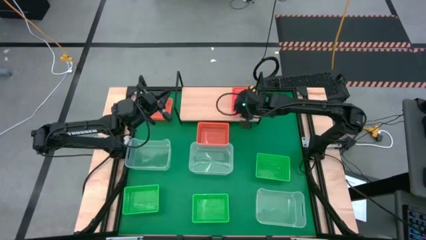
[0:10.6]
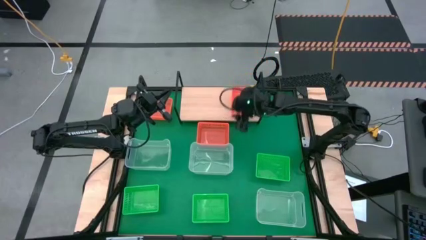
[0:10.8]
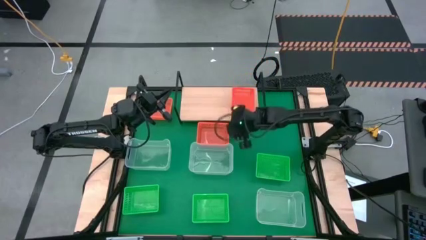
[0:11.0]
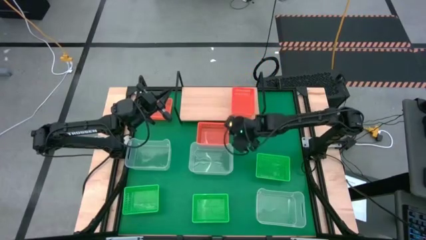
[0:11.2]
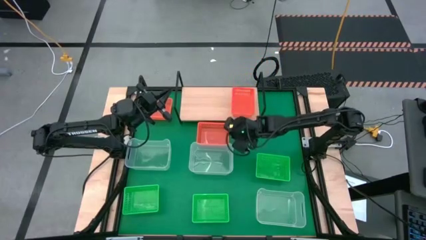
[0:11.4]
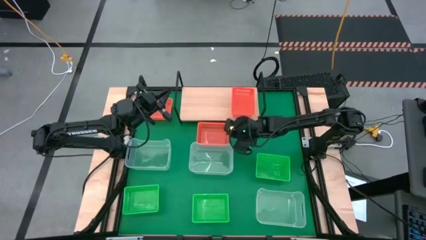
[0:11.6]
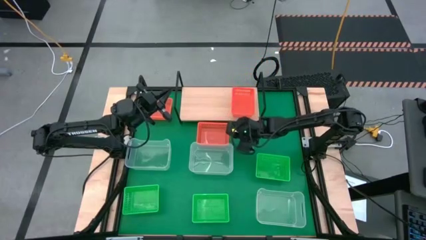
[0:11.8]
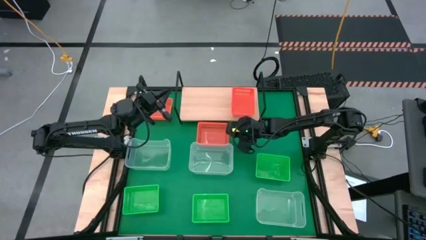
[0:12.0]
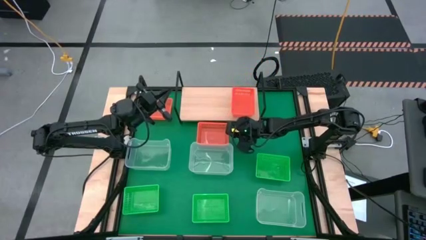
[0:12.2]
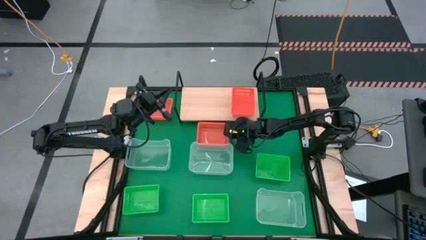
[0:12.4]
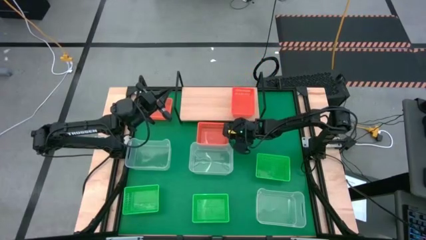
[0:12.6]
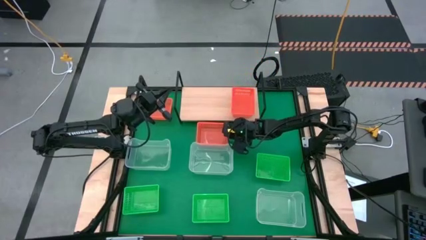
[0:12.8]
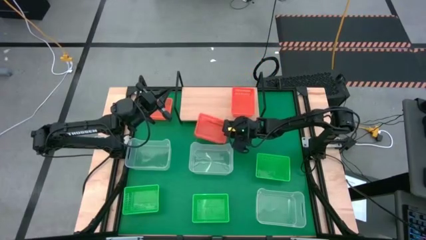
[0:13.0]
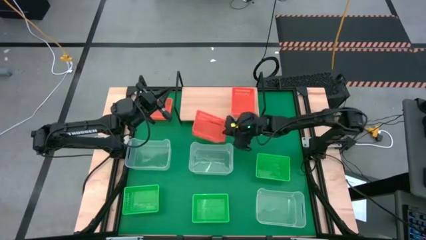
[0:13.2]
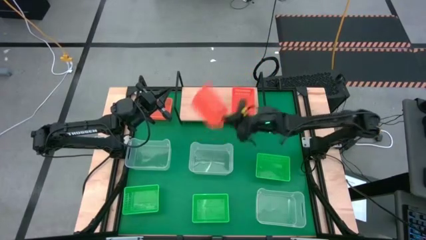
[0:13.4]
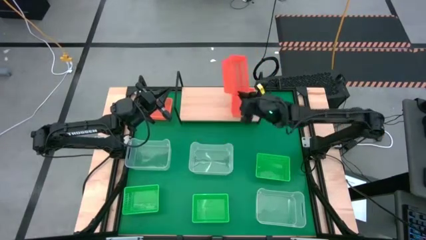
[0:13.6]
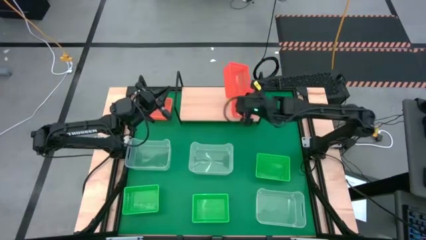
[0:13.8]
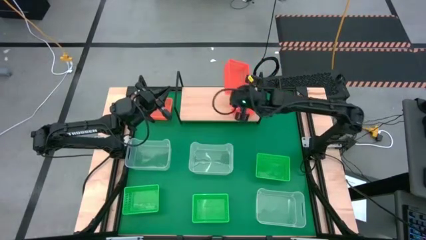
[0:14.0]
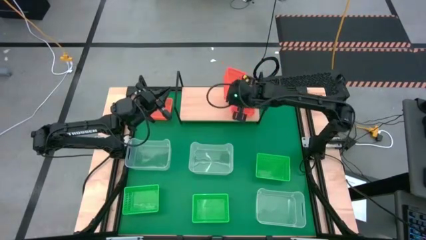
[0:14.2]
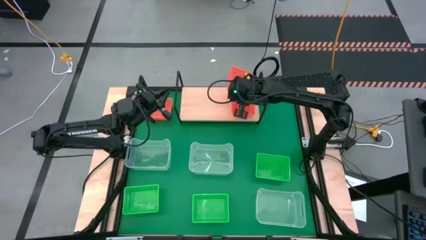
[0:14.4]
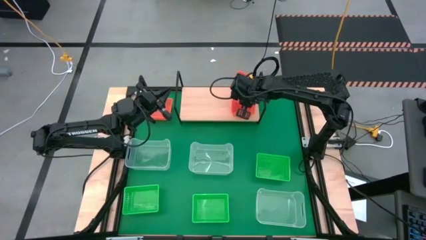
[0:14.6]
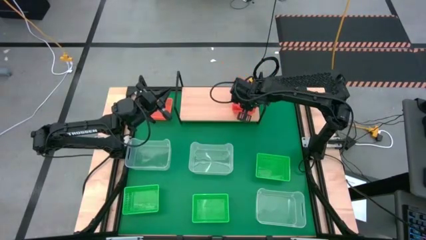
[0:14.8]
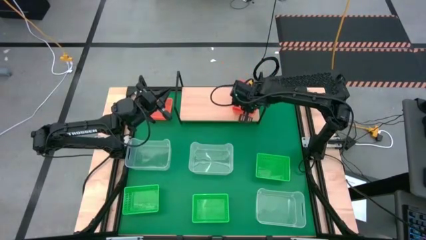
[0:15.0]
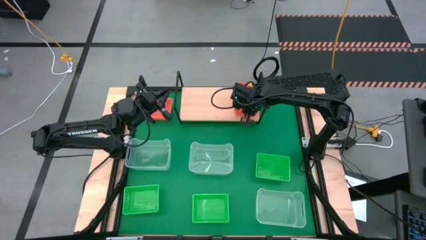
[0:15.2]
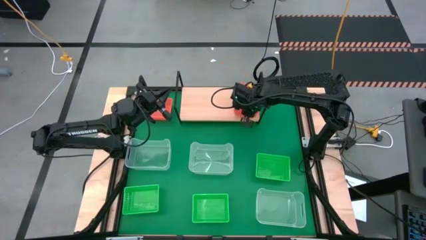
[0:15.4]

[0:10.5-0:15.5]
Task: Stack baskets on shelf by color
Stack the right orange bin on top of the other orange bin on the shelf

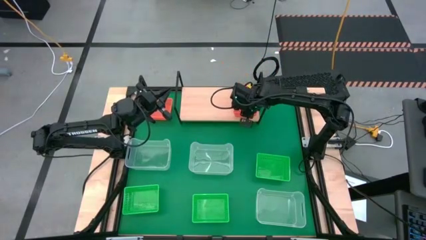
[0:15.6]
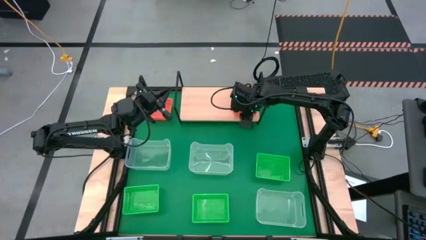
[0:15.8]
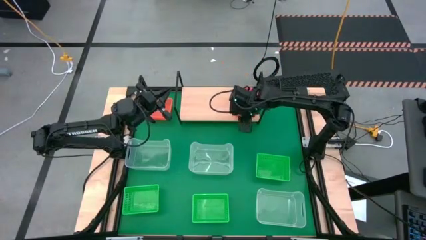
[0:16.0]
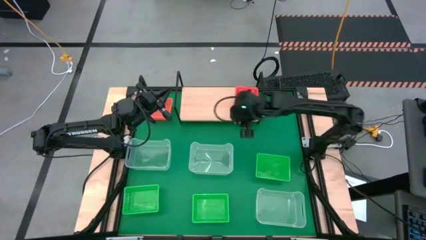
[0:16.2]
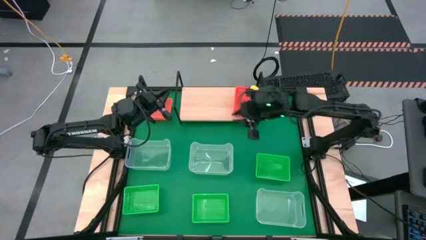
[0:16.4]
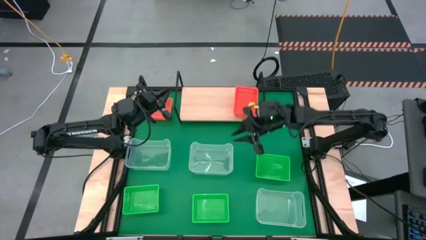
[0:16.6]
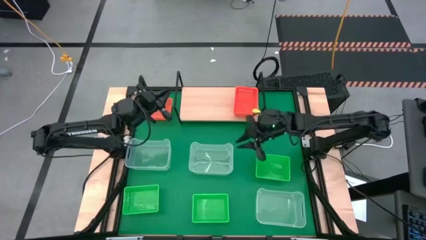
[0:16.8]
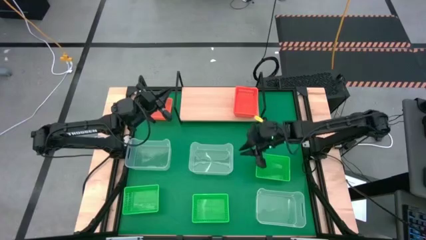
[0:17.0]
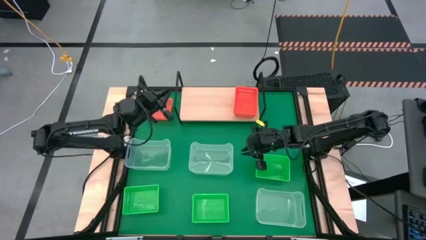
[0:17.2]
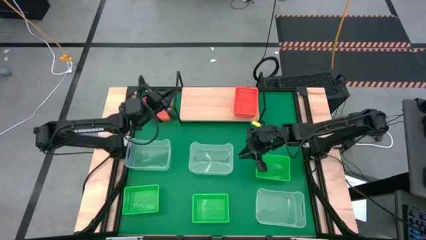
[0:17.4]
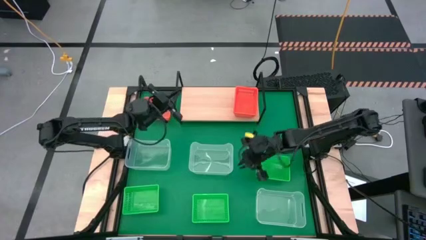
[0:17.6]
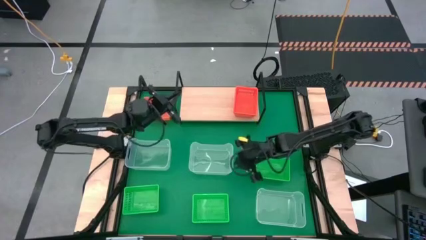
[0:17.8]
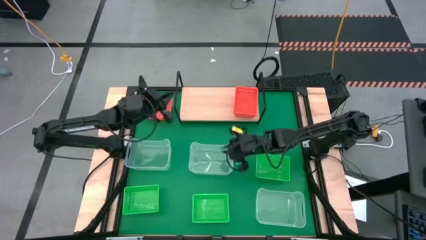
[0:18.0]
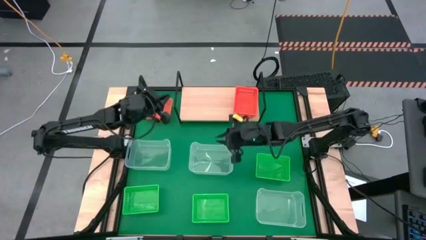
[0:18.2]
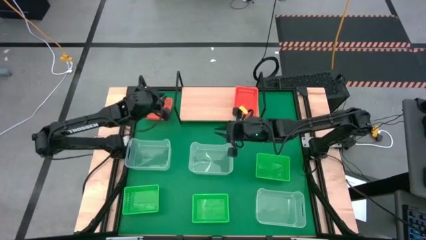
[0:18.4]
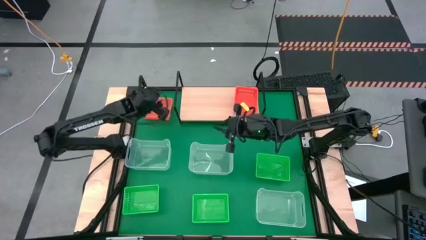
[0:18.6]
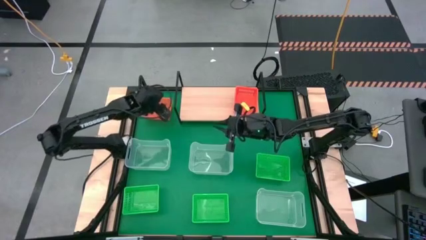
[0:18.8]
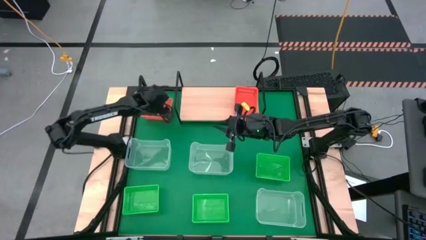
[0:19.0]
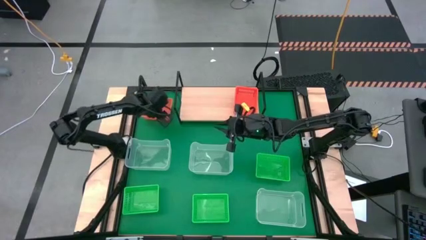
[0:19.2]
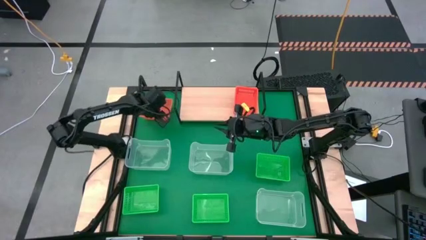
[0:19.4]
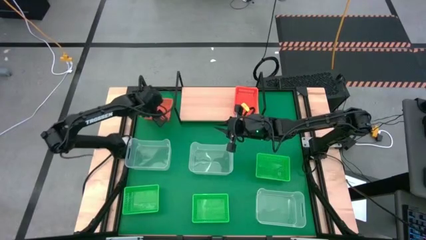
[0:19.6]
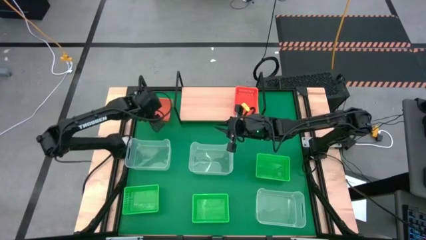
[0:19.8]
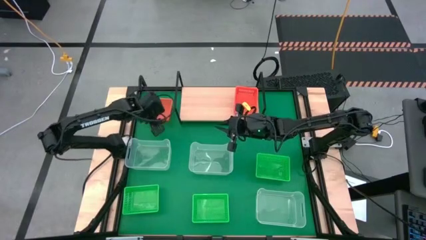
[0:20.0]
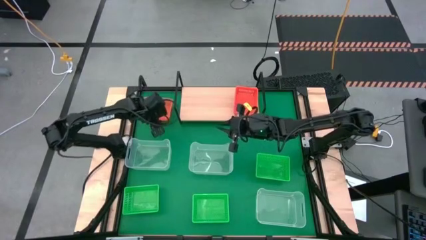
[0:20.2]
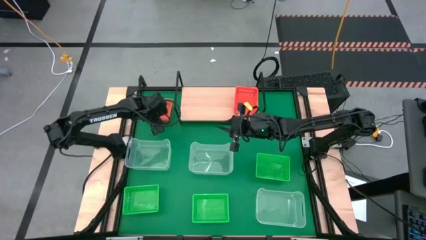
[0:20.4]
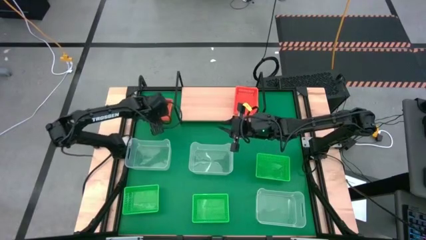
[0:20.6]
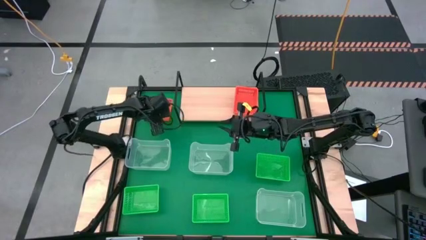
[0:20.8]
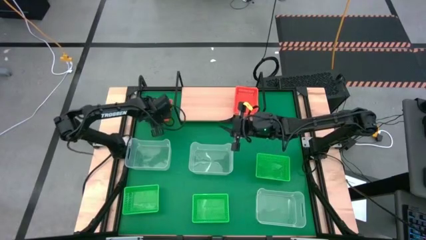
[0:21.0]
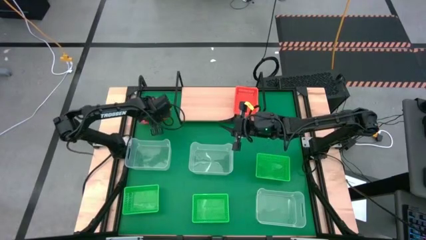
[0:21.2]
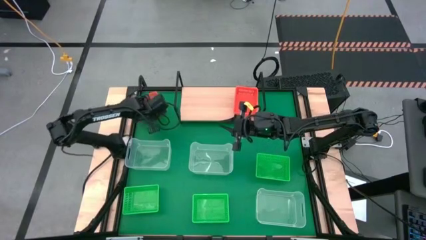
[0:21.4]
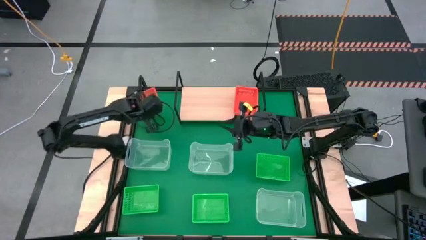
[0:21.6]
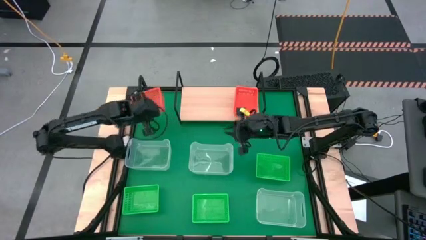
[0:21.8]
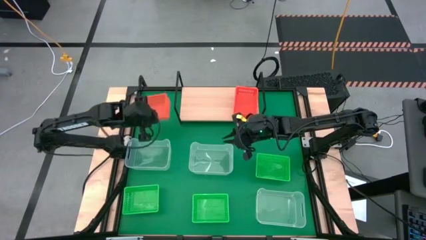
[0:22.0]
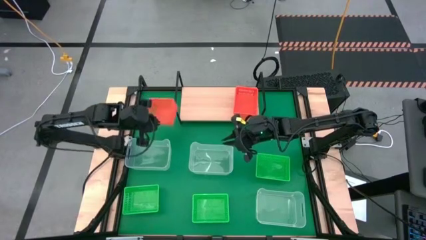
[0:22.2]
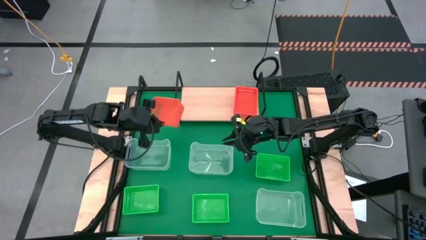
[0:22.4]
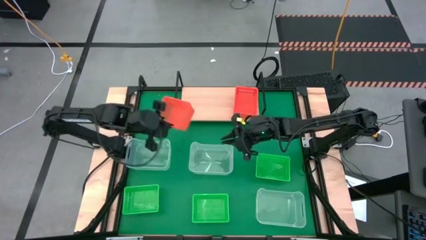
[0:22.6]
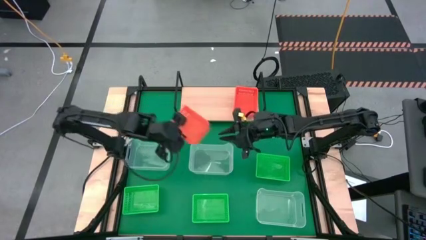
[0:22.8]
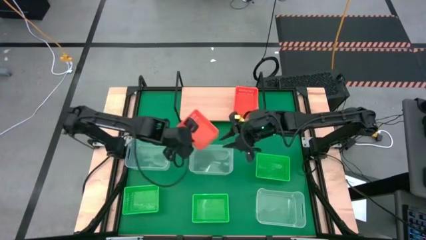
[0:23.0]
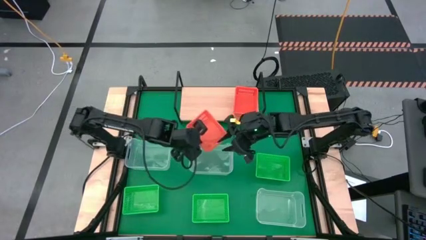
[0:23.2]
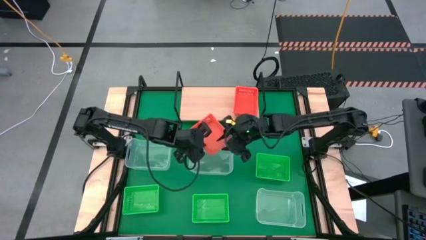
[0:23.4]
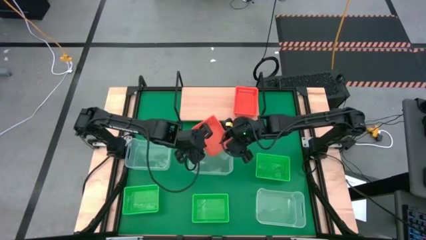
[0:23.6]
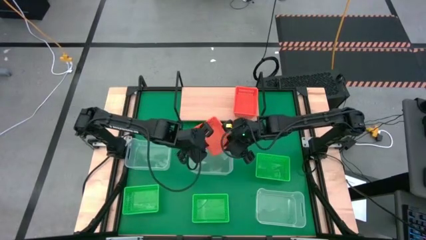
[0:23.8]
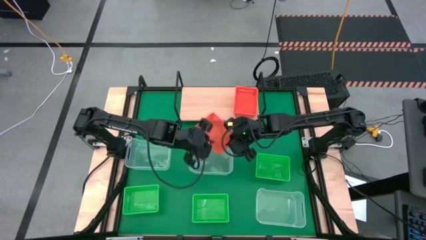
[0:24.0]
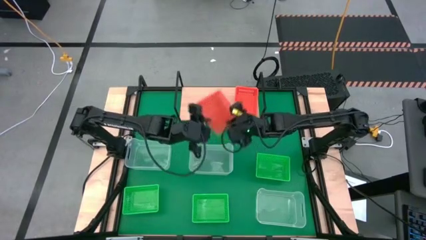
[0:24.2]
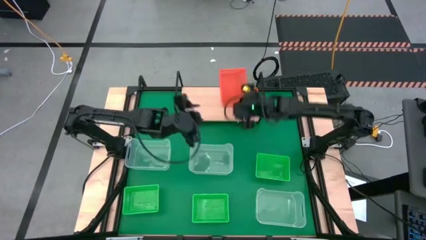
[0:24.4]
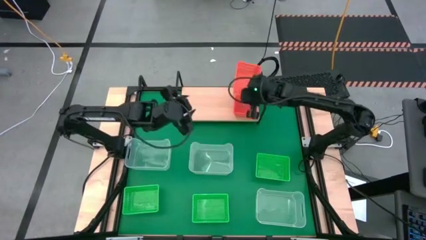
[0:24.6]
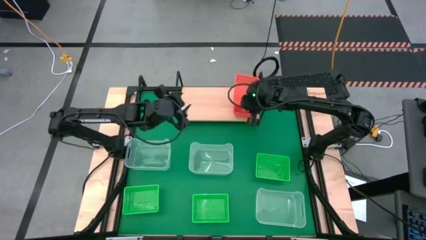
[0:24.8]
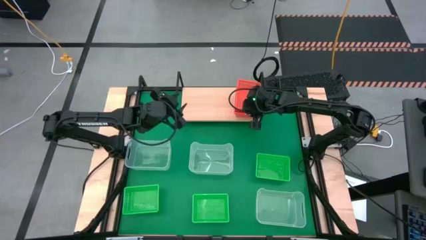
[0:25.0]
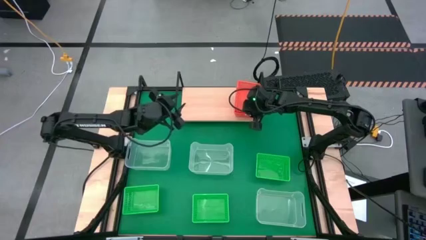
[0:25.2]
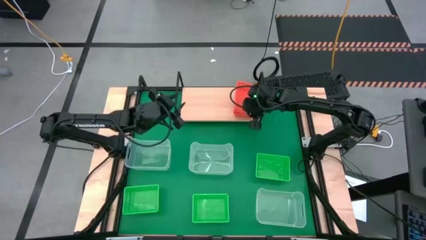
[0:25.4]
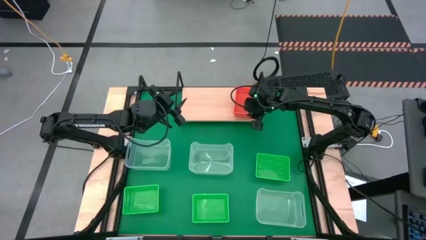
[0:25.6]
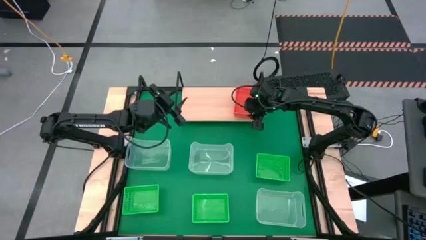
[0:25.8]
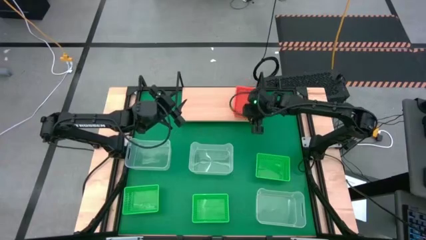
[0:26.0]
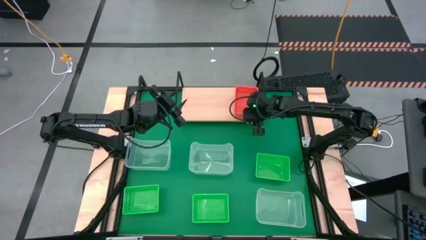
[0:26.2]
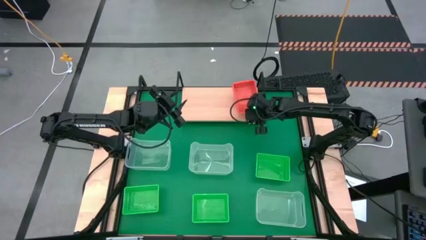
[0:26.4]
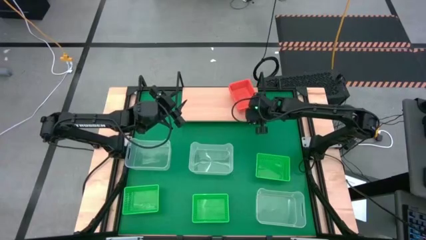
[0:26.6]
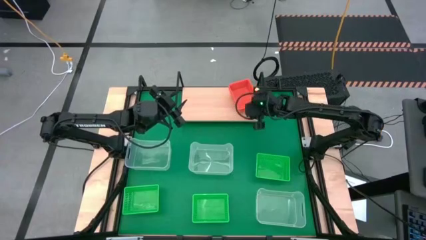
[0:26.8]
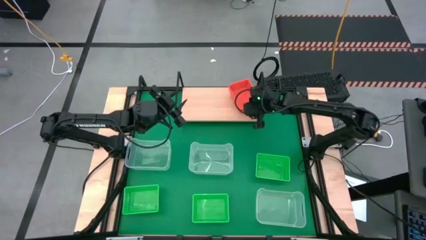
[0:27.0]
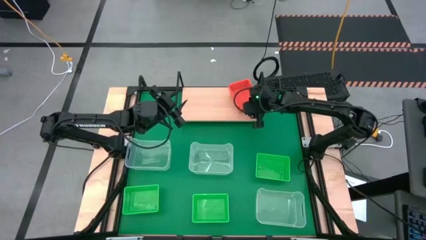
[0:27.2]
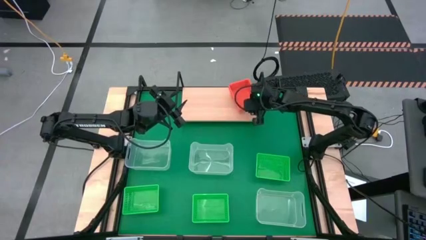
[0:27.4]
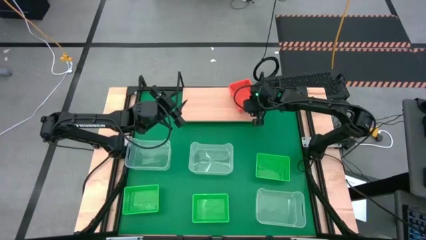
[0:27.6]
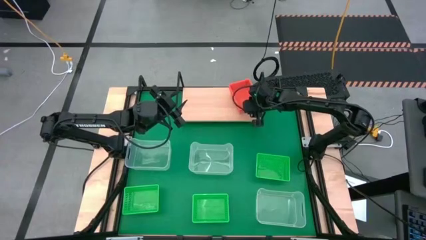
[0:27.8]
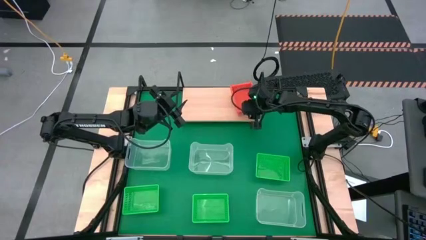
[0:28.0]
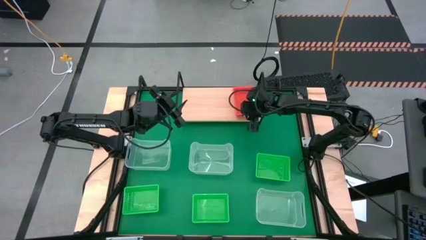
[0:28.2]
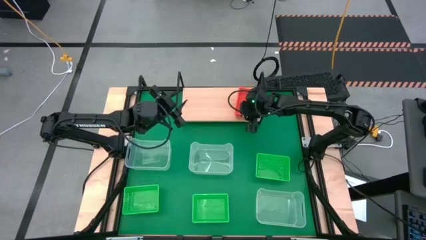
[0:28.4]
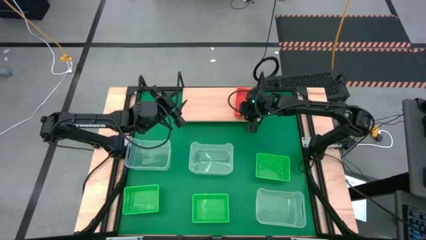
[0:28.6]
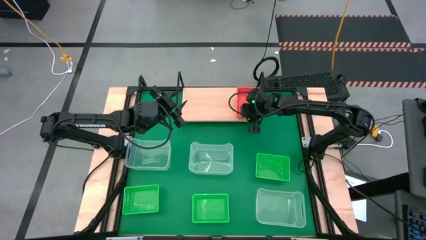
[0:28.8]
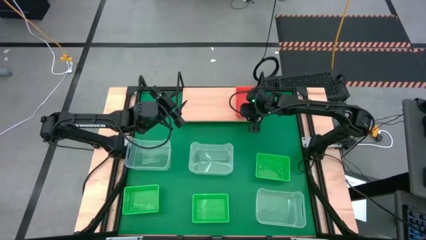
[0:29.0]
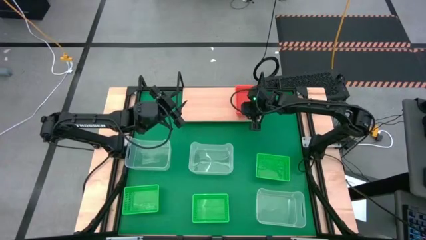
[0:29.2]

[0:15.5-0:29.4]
Stack the orange bin on top of the other orange bins on the shelf
